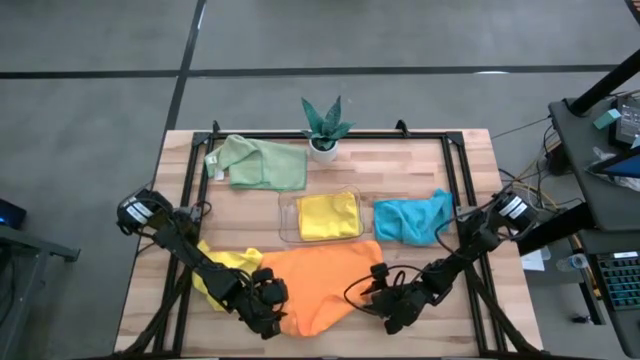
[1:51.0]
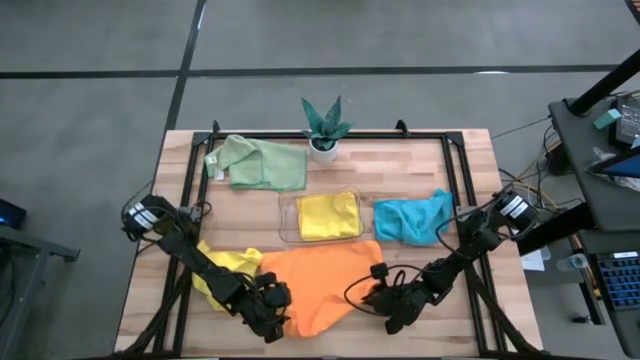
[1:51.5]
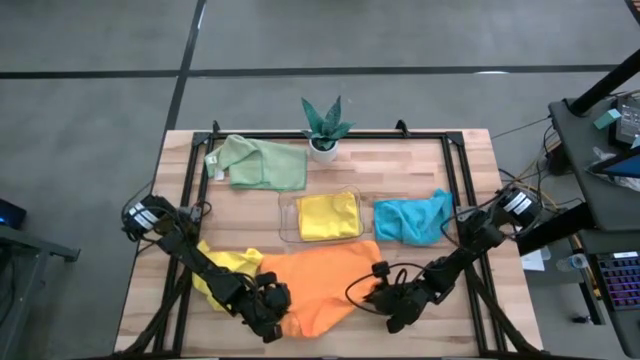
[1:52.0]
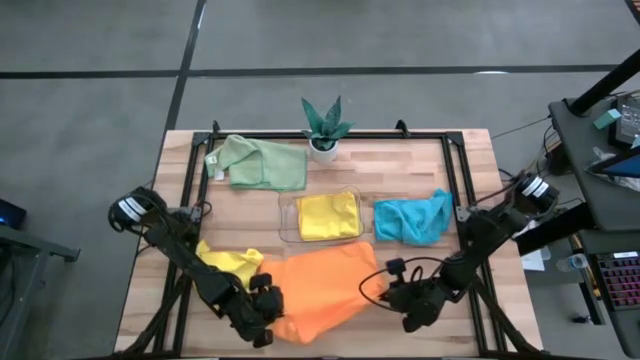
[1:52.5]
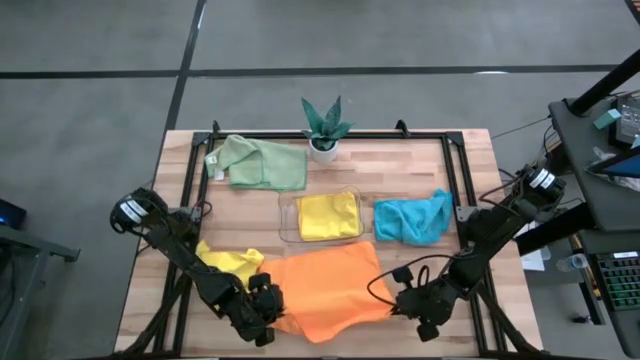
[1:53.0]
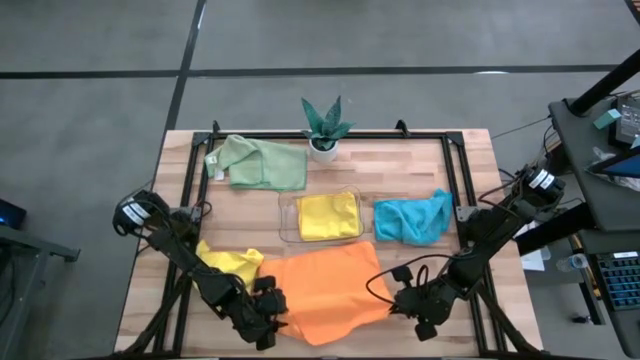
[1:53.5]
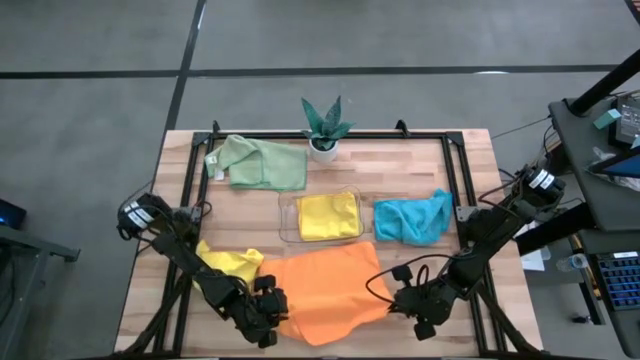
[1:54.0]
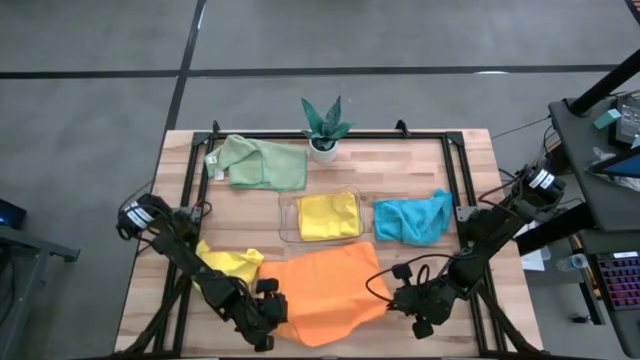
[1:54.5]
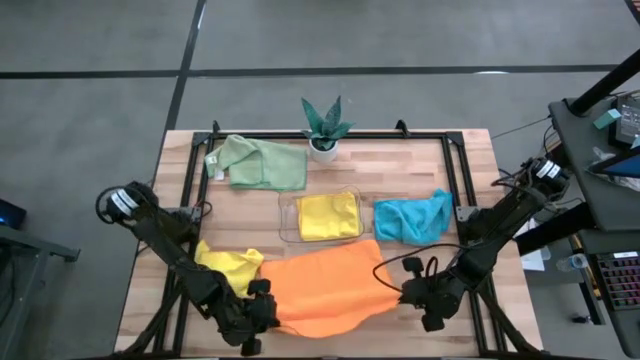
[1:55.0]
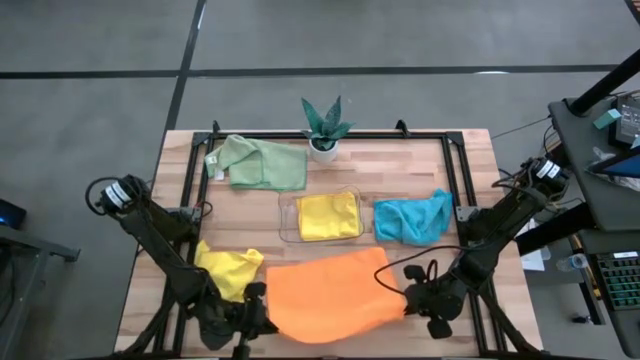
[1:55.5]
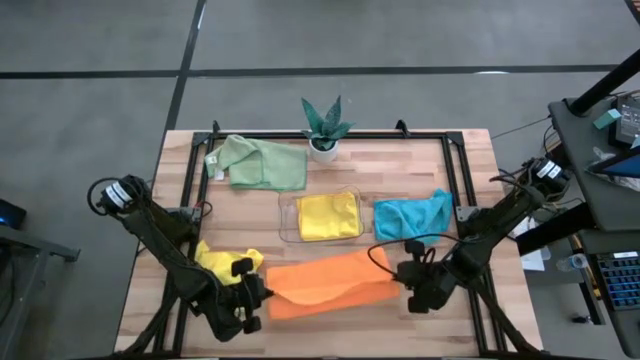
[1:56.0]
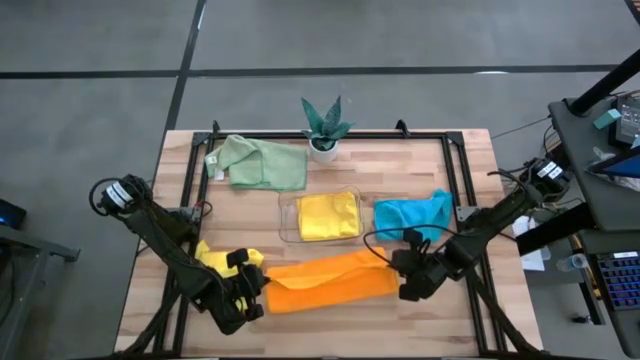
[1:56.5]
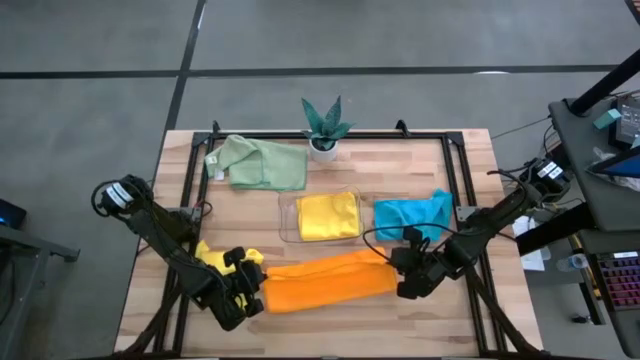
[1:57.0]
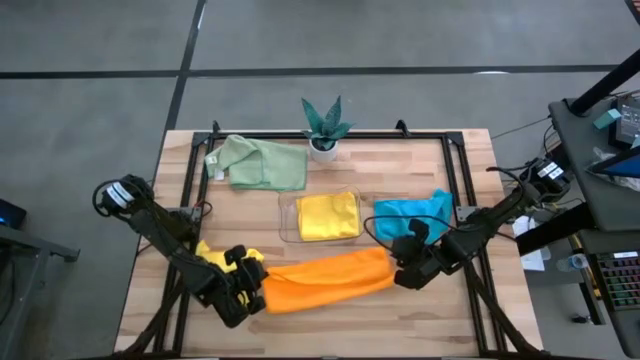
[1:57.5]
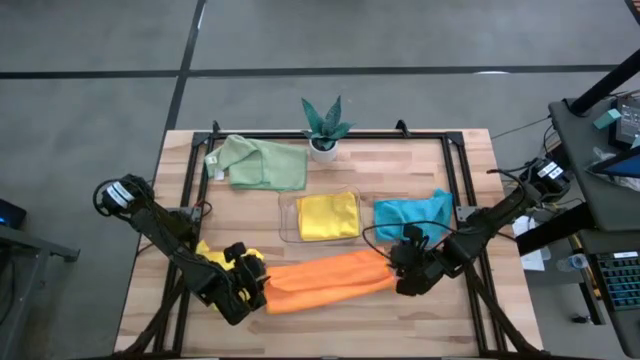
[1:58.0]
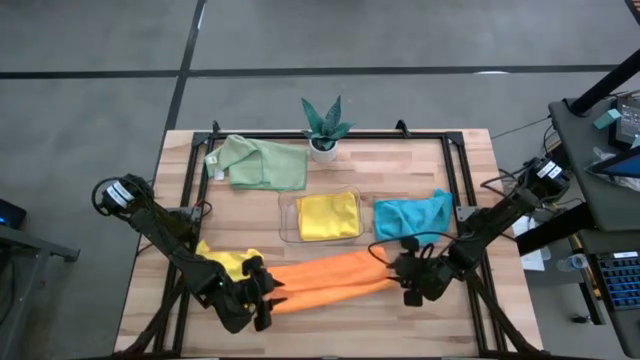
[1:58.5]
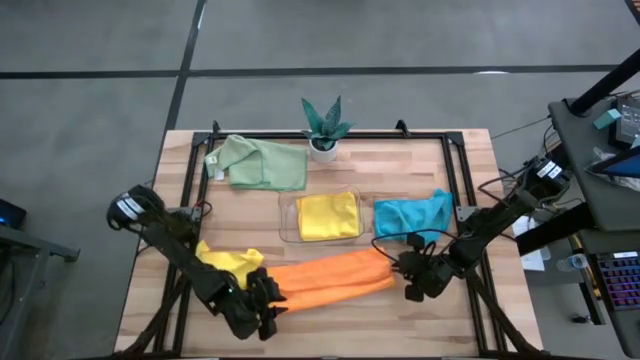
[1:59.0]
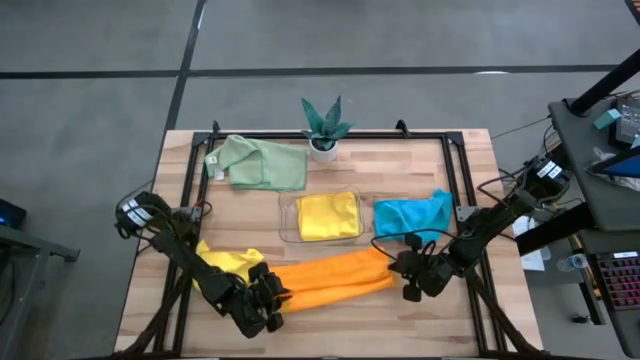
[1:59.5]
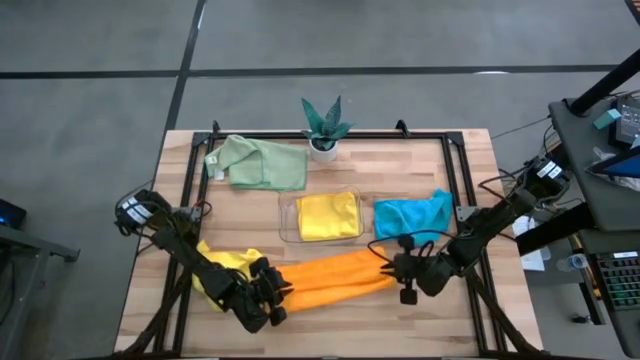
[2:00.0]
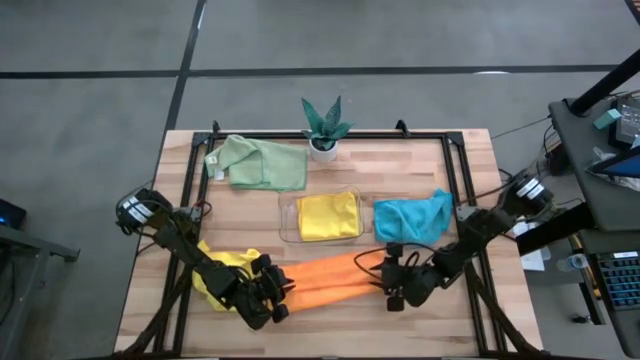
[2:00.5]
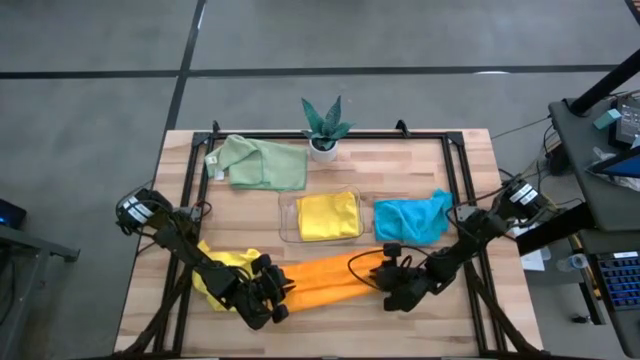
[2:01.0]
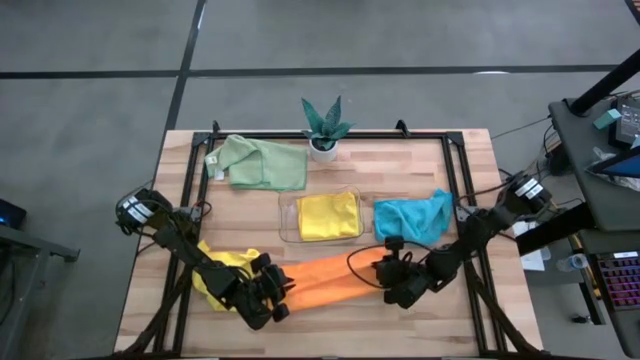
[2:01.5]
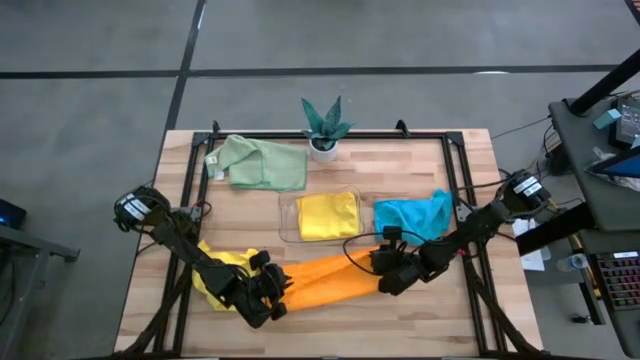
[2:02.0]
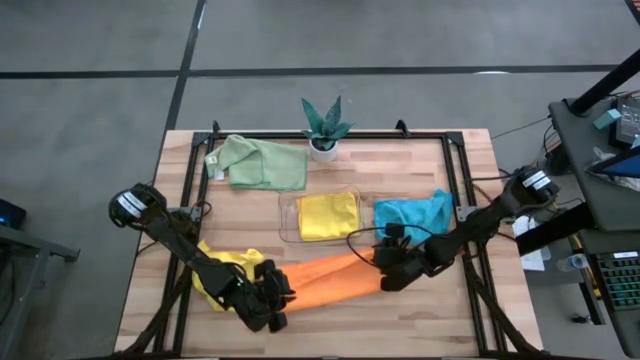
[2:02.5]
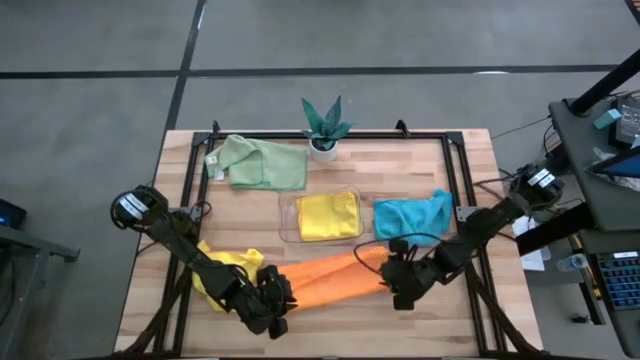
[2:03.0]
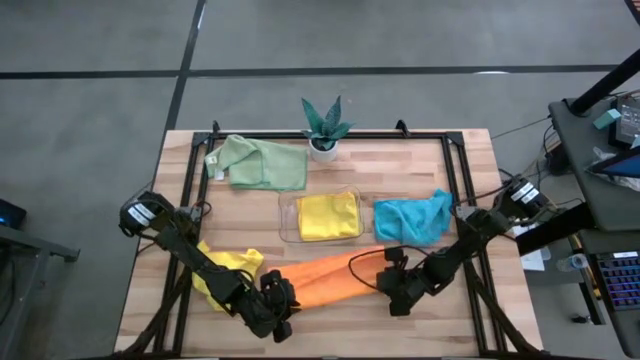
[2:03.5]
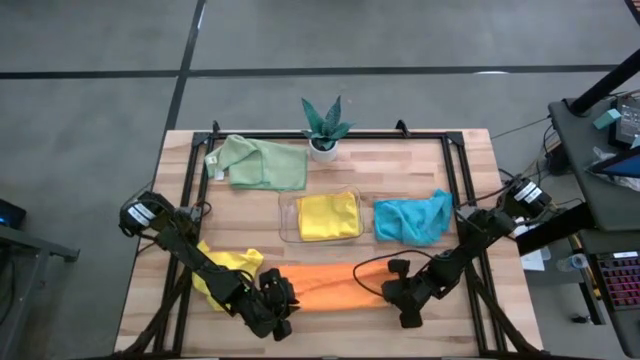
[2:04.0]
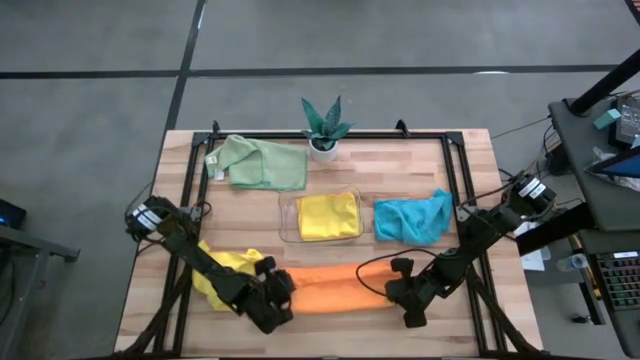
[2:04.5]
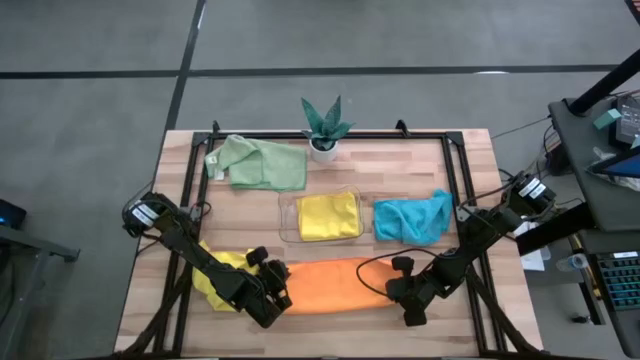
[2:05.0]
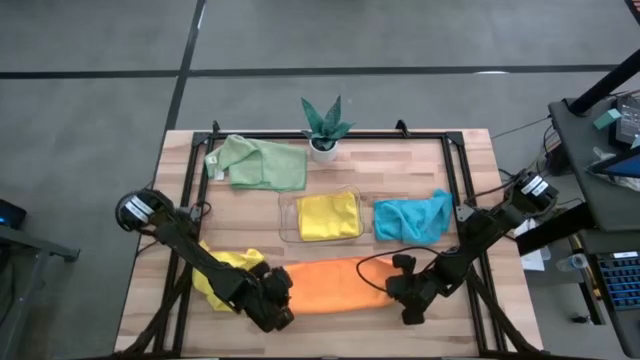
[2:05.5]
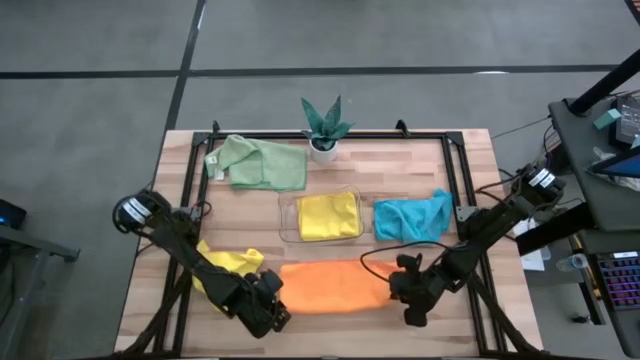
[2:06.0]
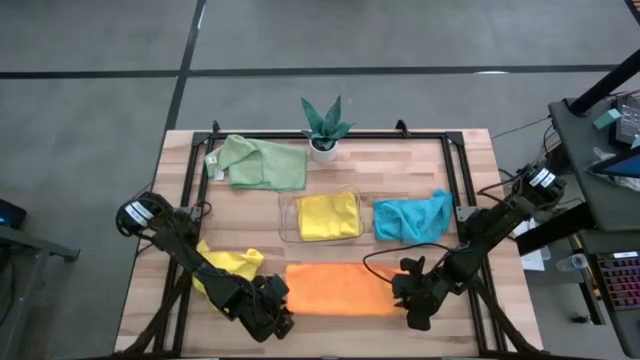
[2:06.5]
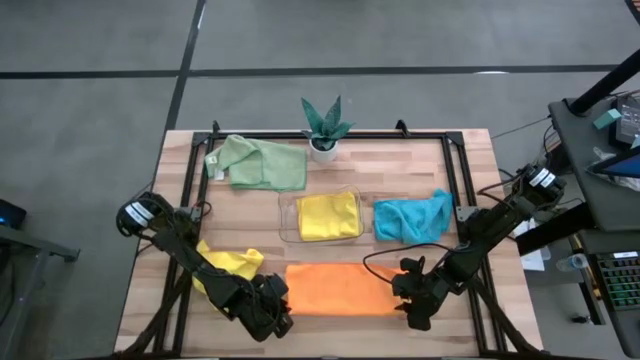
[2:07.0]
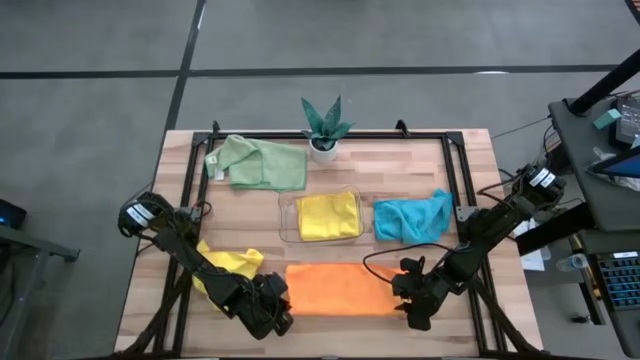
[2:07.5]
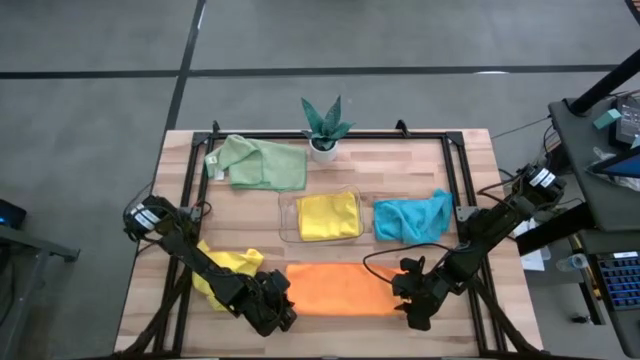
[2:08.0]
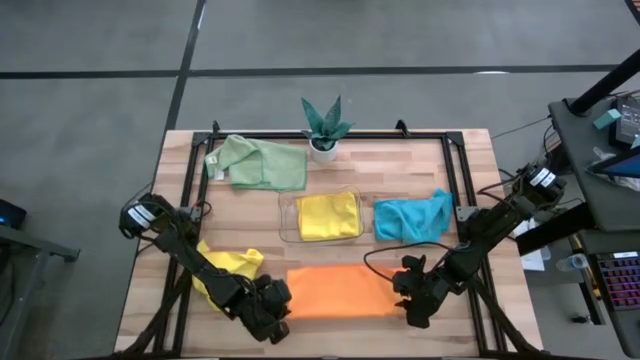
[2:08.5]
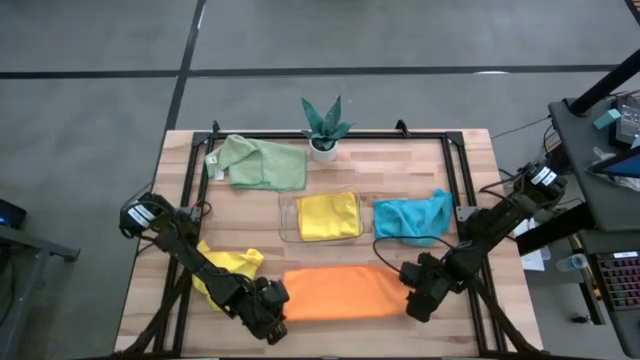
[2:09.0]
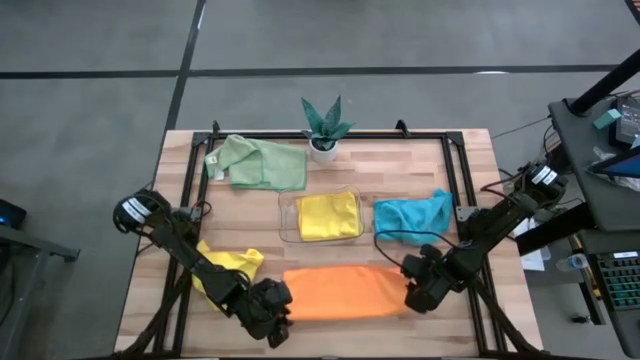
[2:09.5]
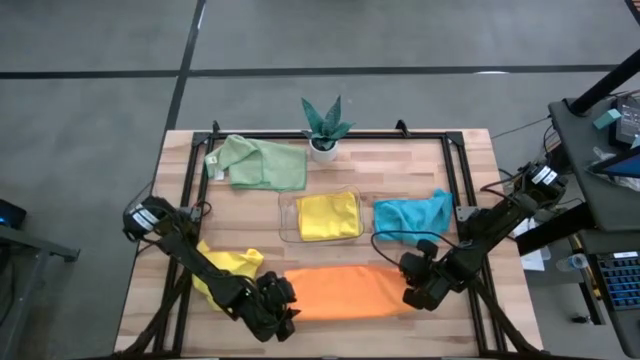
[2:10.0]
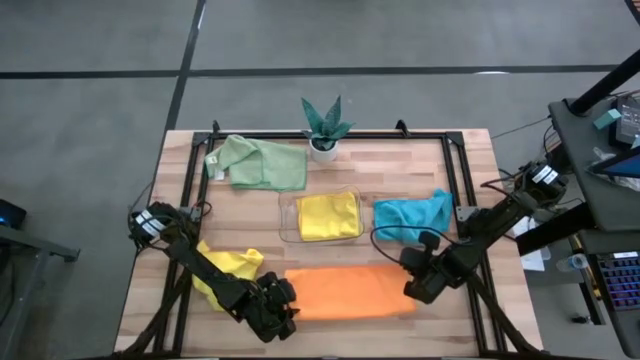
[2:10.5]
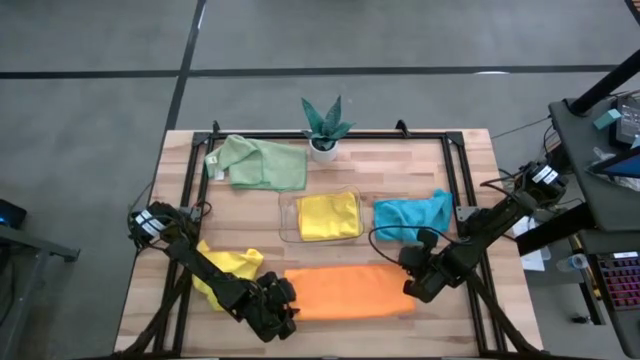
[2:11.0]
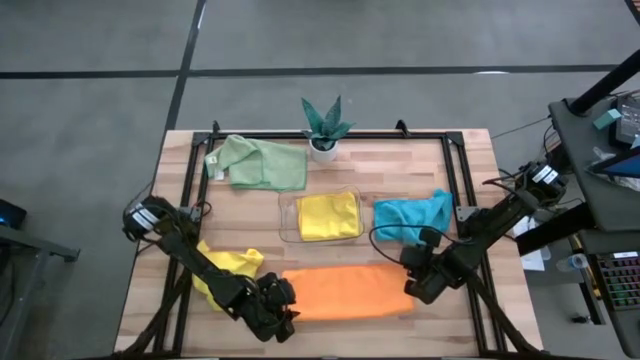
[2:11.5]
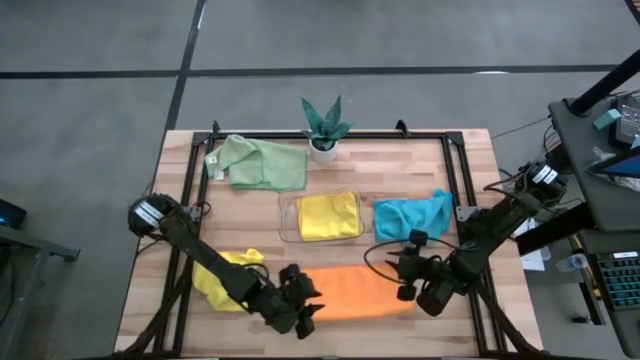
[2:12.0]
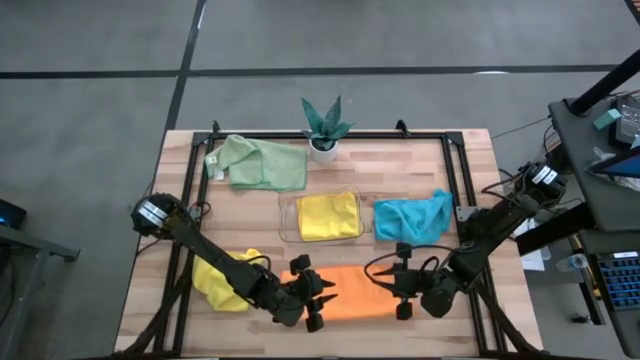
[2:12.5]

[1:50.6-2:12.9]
Task: Fold microfiber towels
Fold the orange microfiber towel
